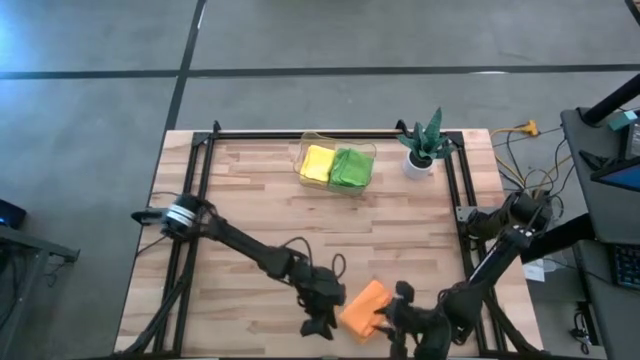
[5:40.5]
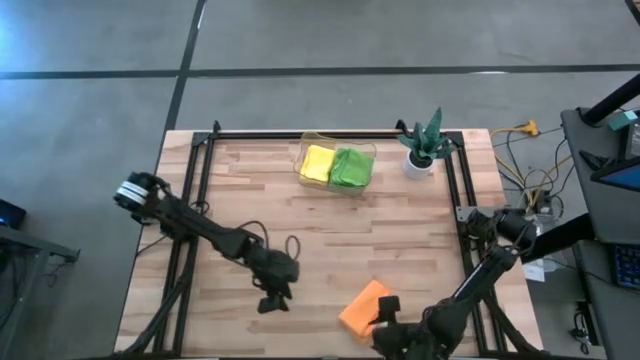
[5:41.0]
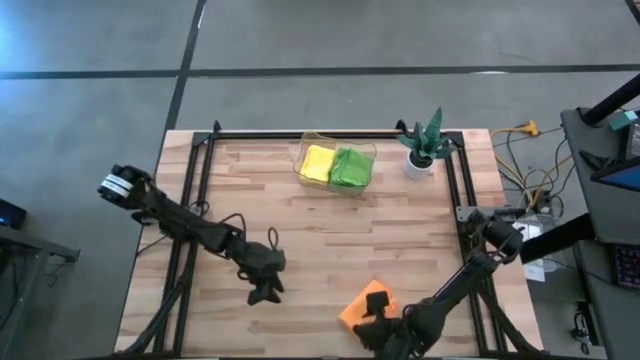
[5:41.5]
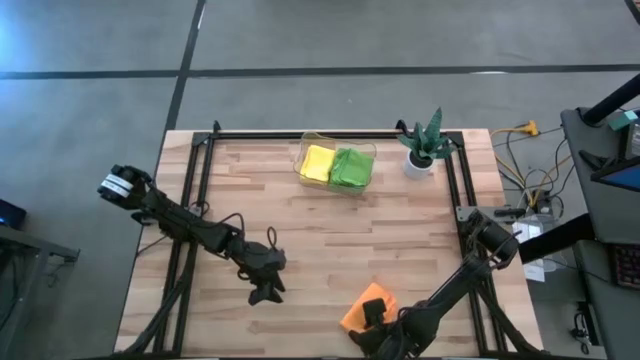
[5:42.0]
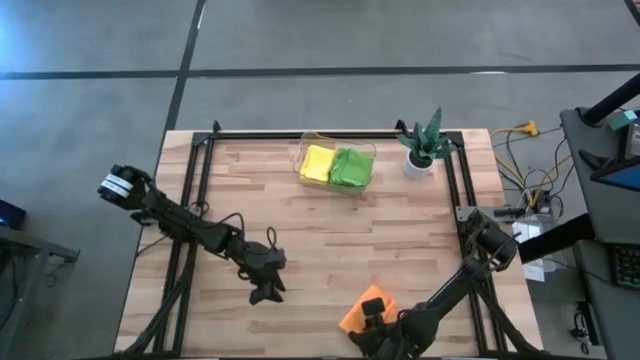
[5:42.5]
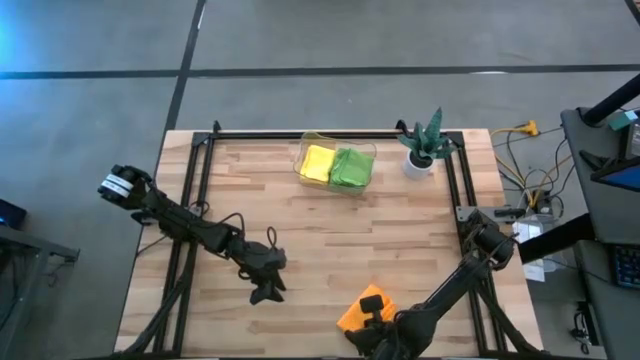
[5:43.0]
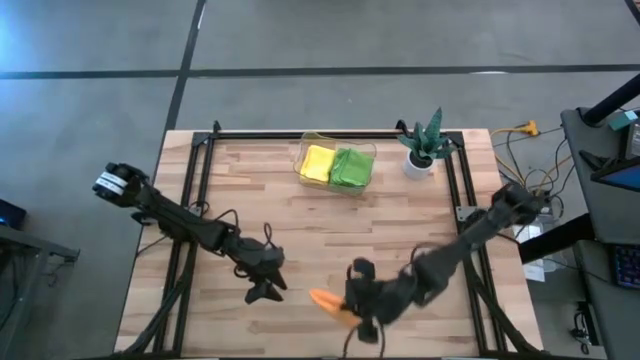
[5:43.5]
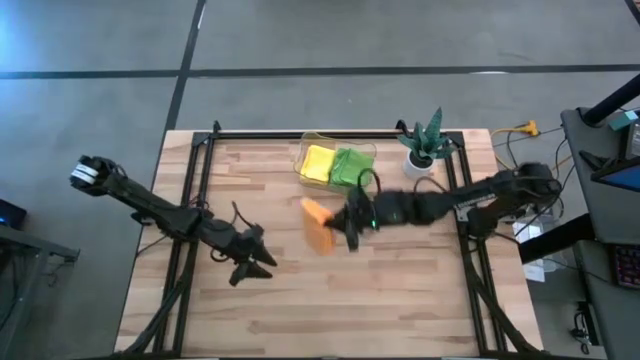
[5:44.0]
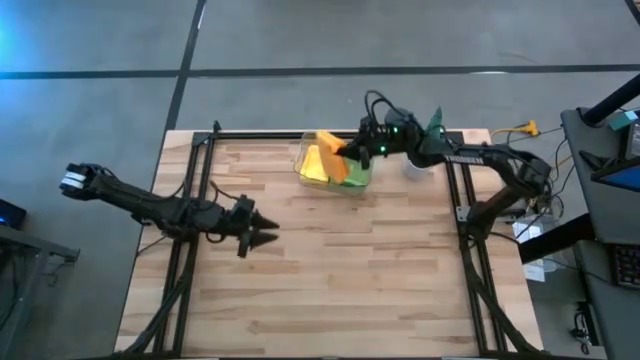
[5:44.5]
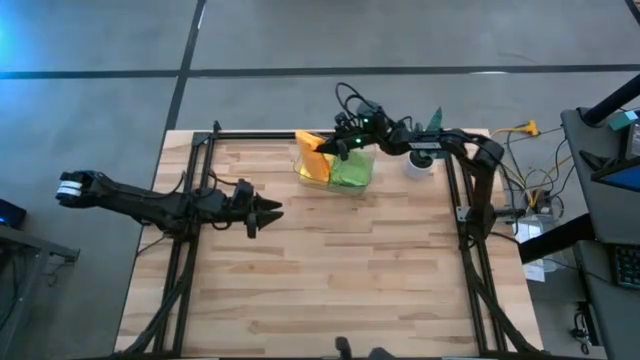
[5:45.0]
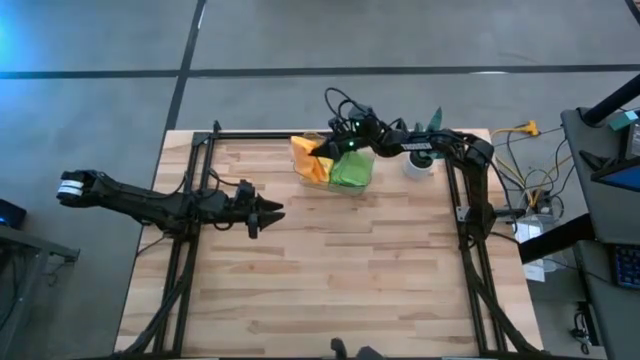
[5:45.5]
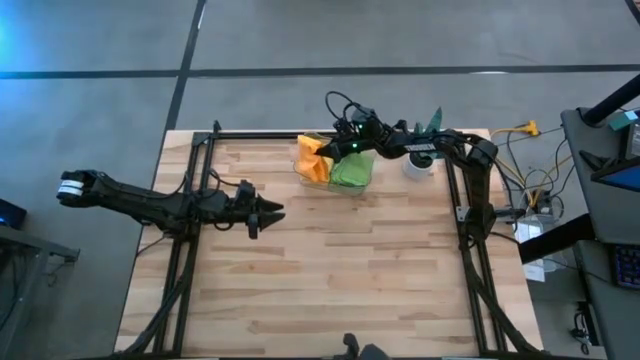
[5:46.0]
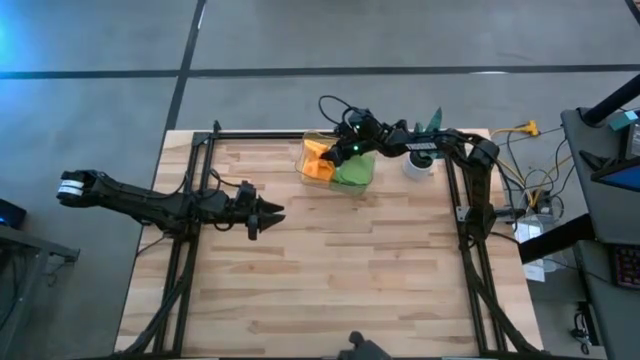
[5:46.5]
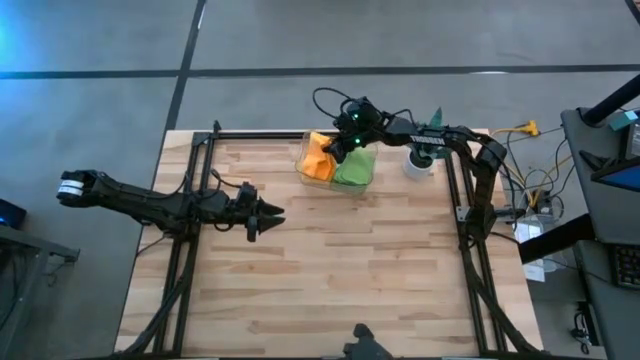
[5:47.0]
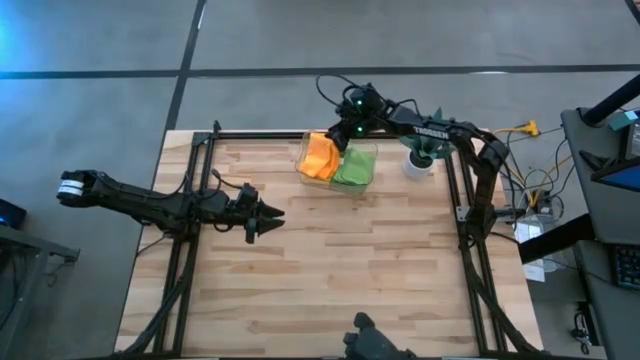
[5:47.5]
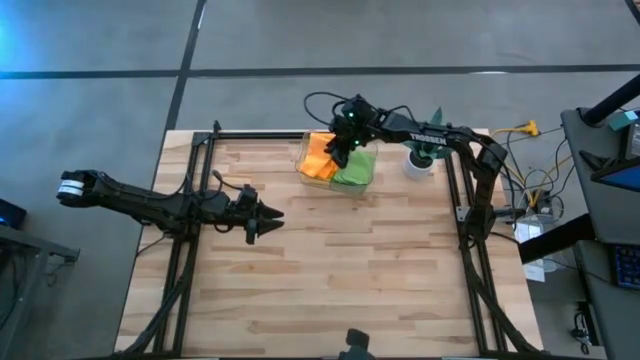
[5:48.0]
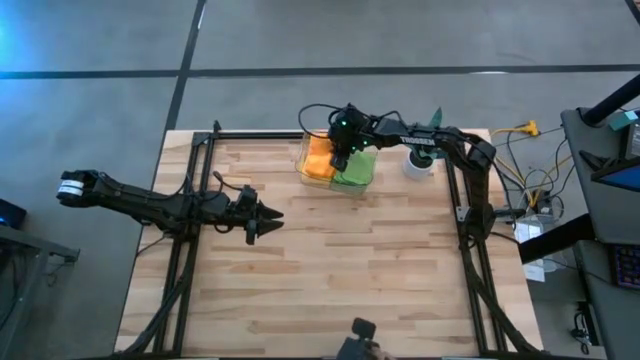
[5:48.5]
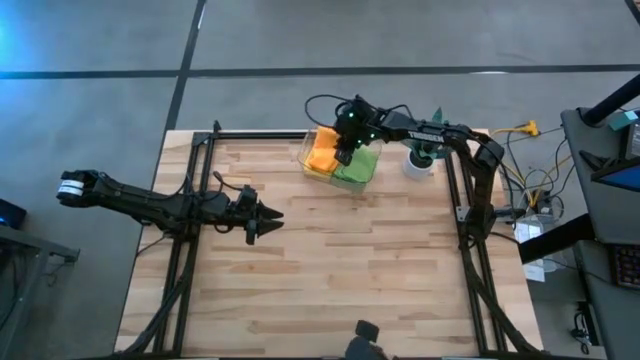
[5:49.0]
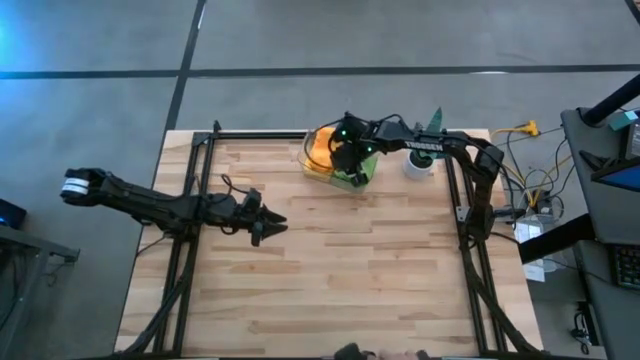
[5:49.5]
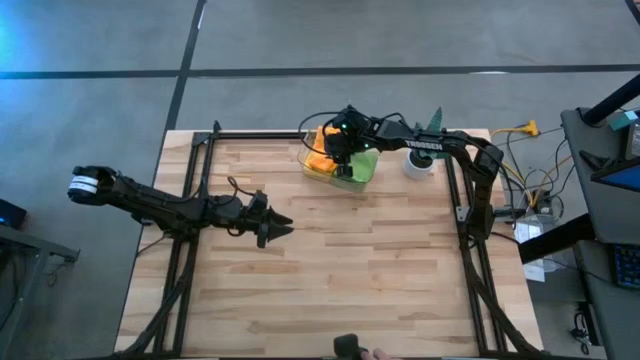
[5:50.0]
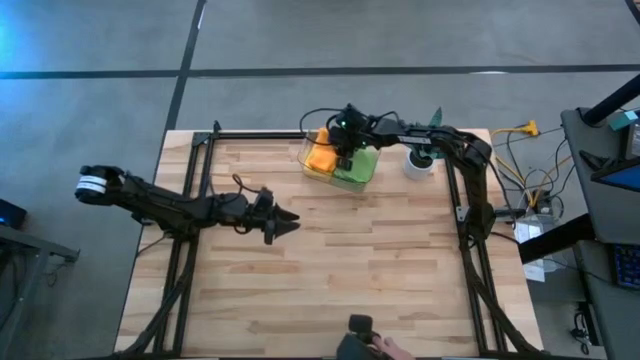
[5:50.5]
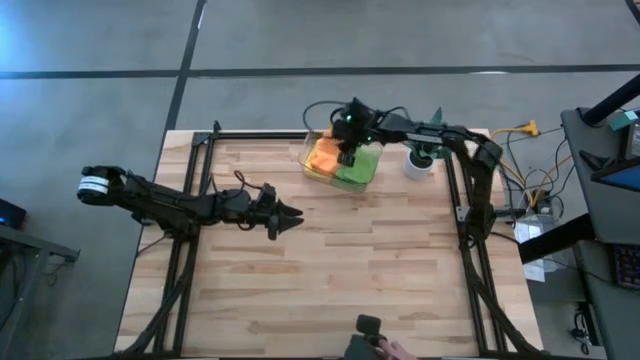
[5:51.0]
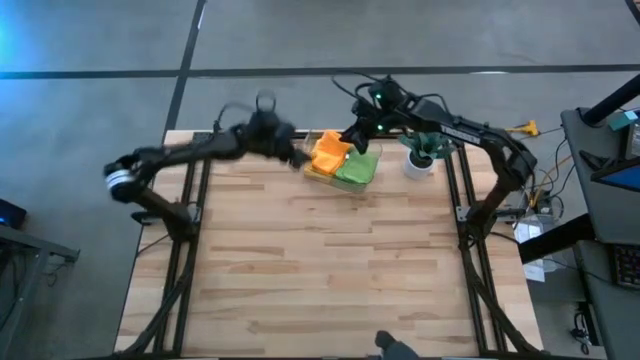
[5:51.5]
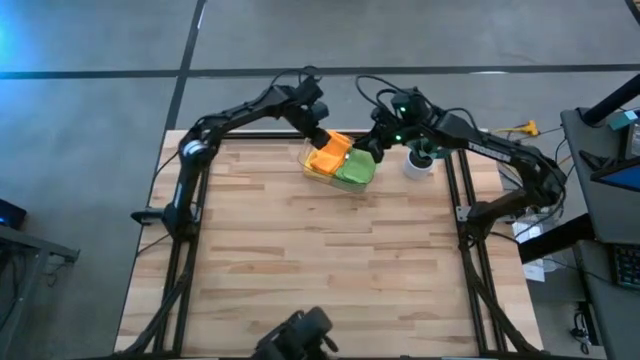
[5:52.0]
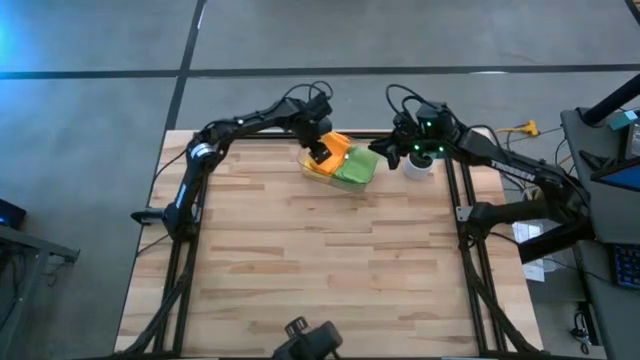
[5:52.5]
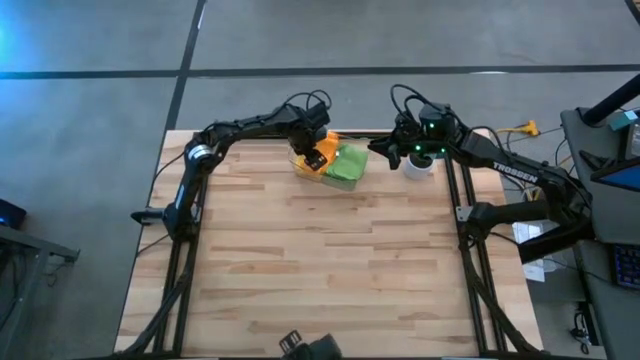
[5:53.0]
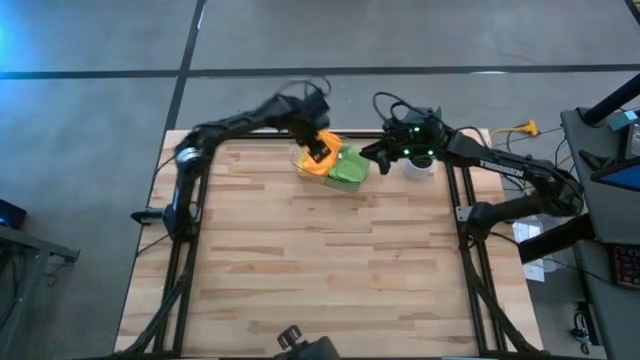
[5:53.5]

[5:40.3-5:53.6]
Task: Fold microfiber towels
Put the folded orange microfiber towel into the transparent bin

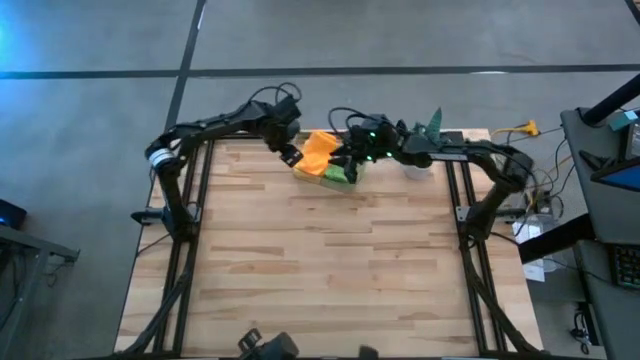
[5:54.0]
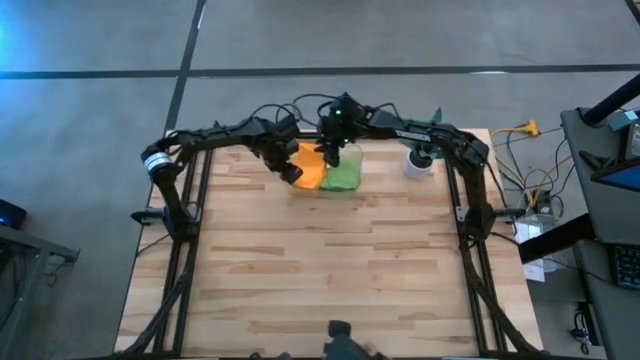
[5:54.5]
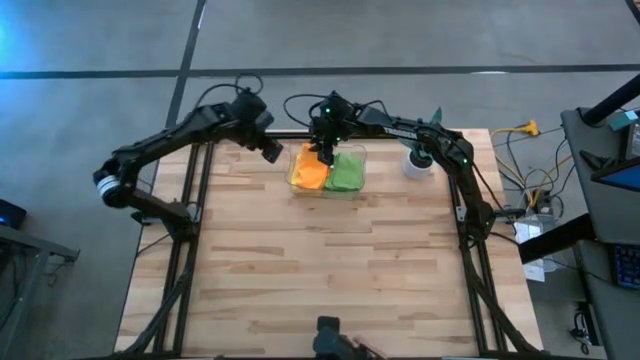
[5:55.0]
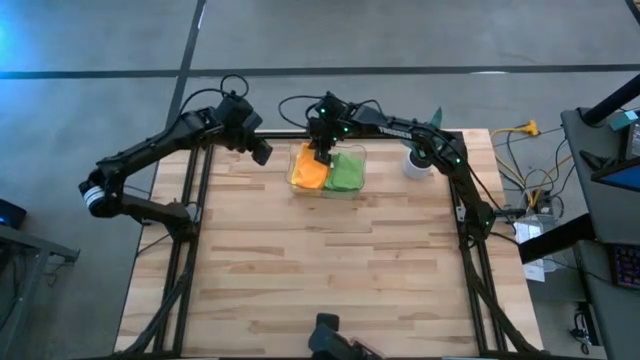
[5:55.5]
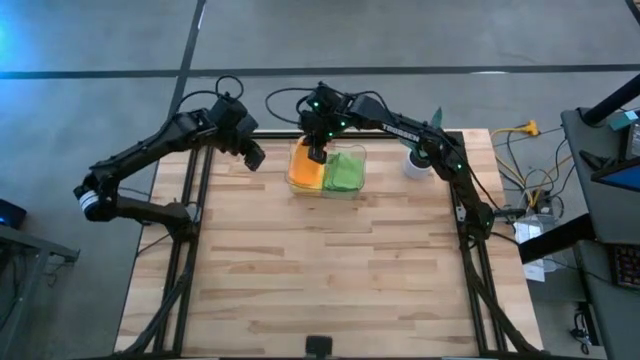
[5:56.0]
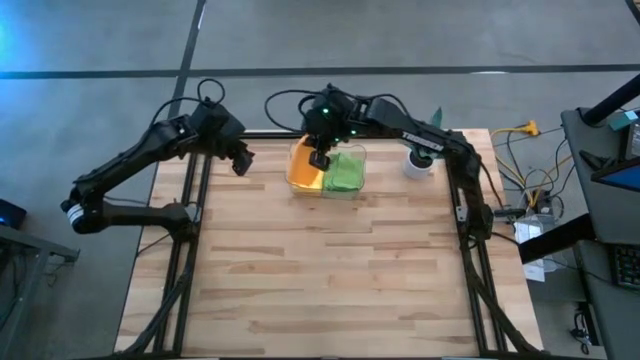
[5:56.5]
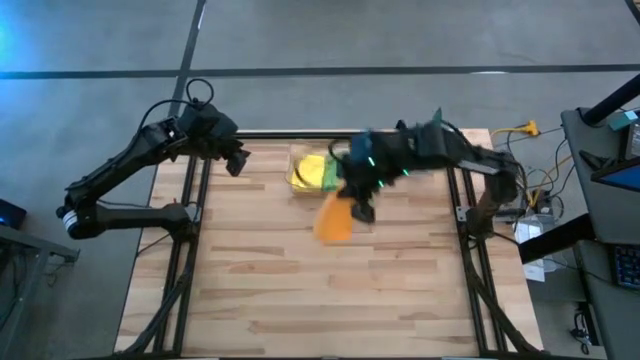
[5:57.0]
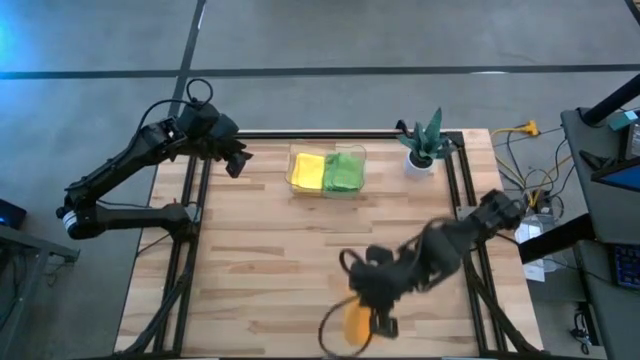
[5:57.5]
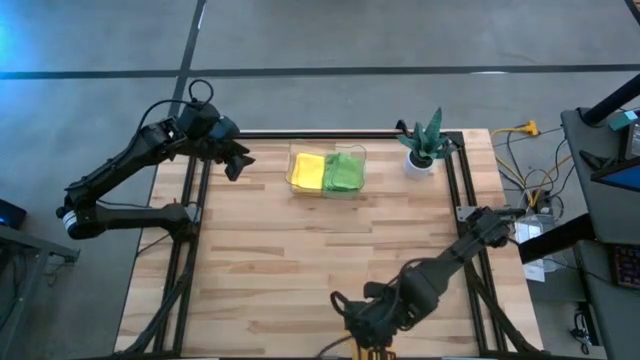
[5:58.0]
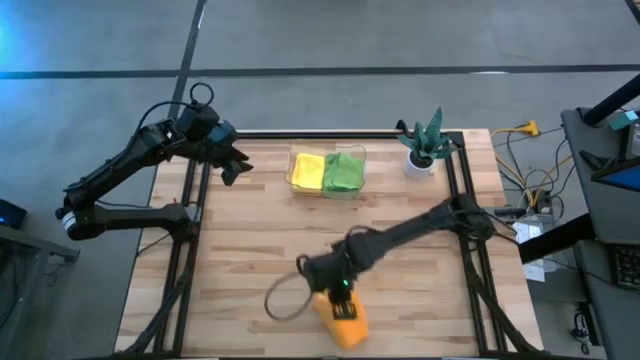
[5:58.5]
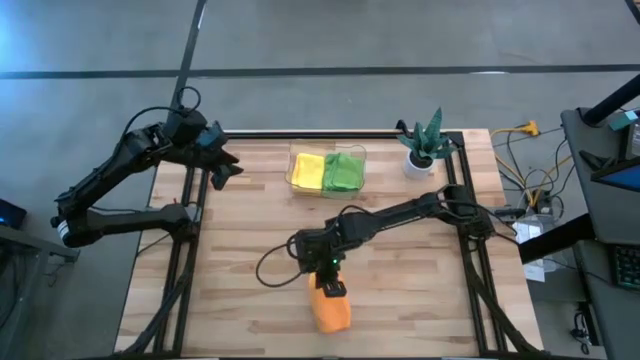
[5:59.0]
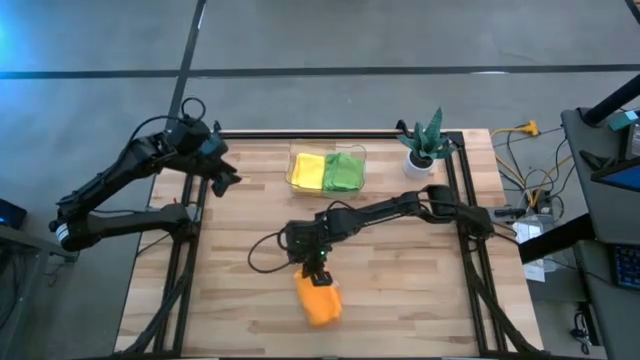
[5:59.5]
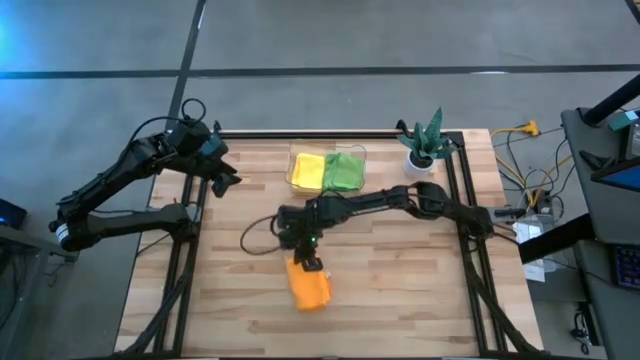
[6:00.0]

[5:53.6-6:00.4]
Remove the folded orange microfiber towel from the transparent bin

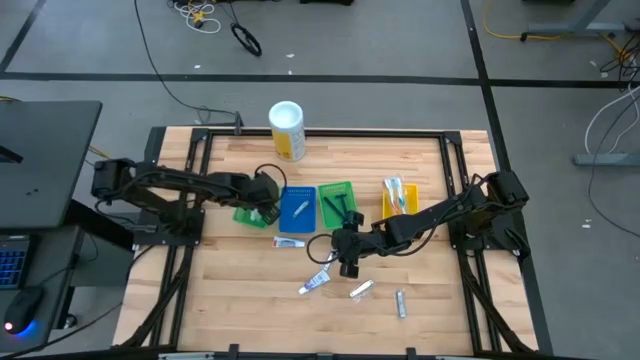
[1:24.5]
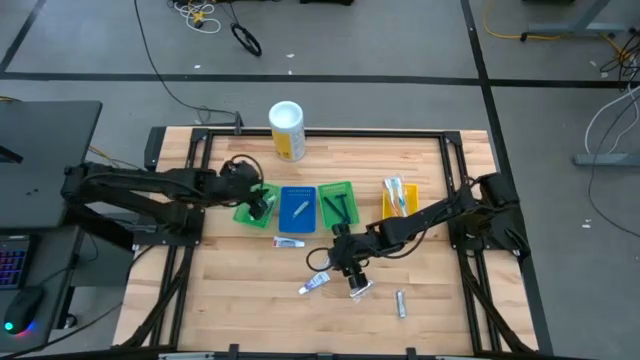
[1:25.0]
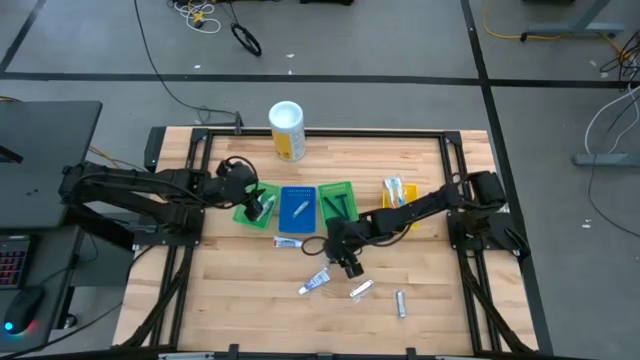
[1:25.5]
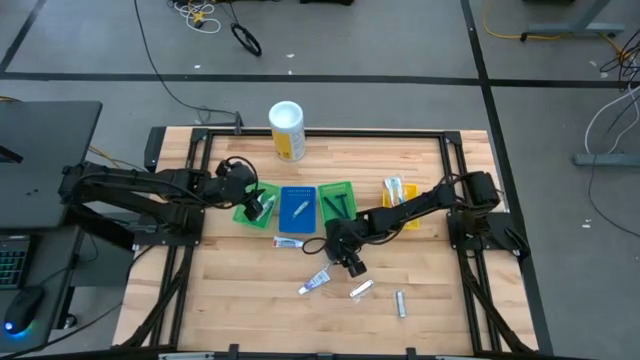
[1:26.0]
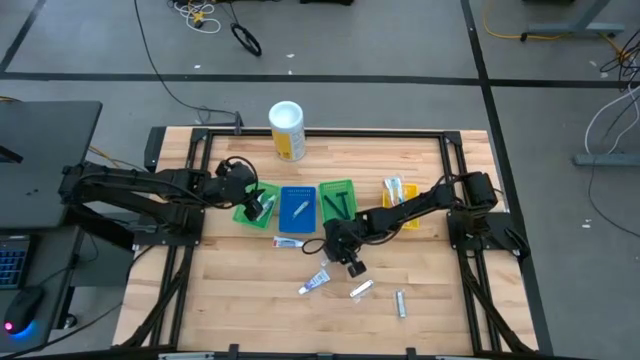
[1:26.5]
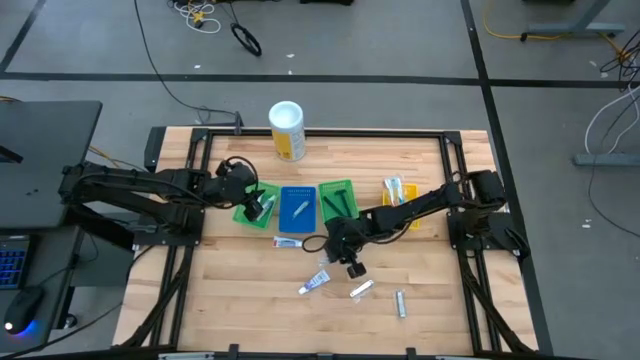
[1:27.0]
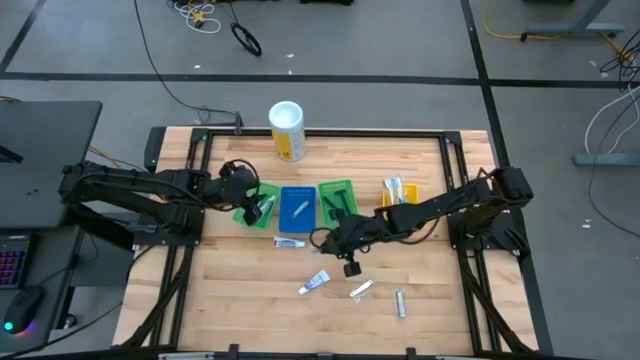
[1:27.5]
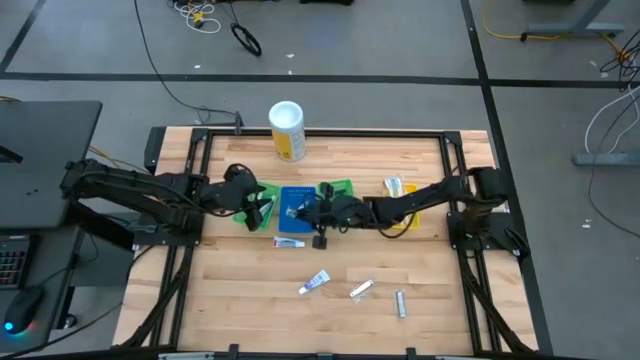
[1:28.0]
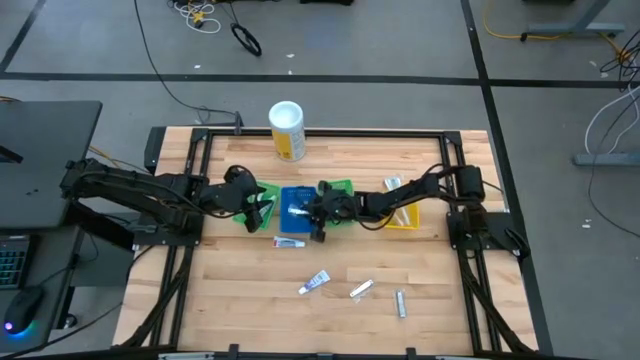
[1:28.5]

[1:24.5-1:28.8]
Task: Pick & Place Travel size toiletries
Put the silver nail cutter into the blue bin
